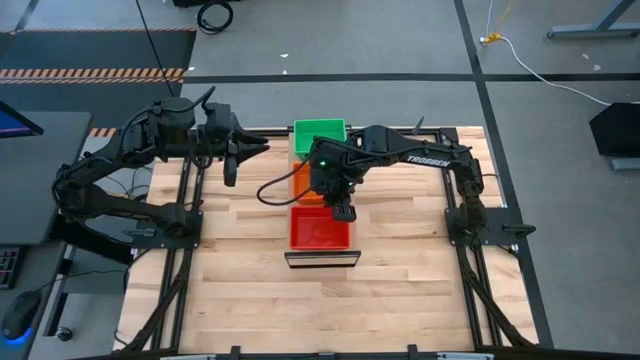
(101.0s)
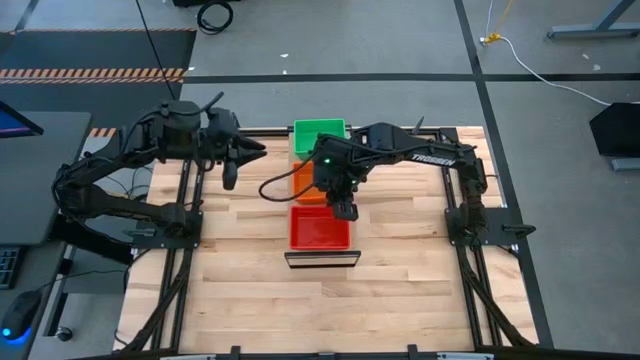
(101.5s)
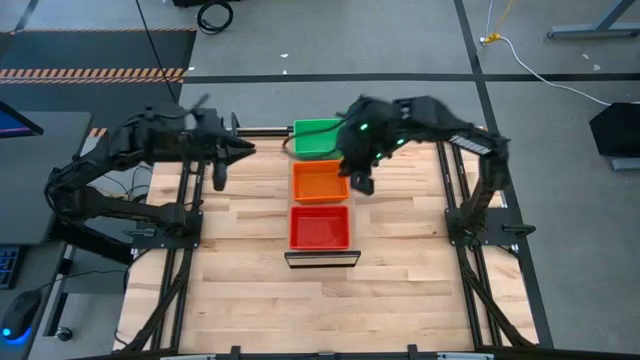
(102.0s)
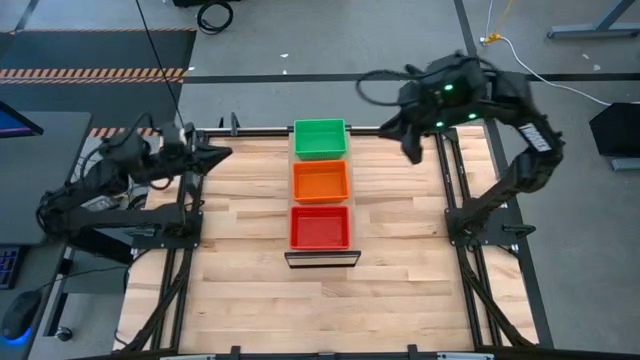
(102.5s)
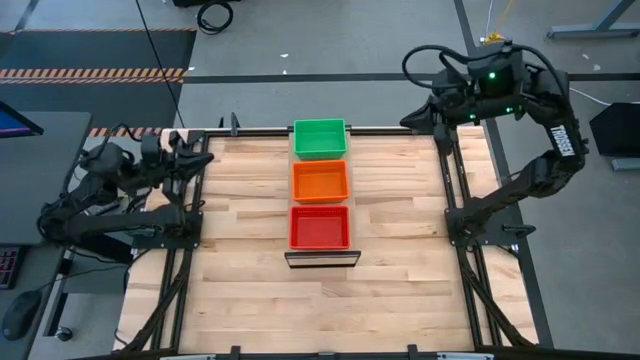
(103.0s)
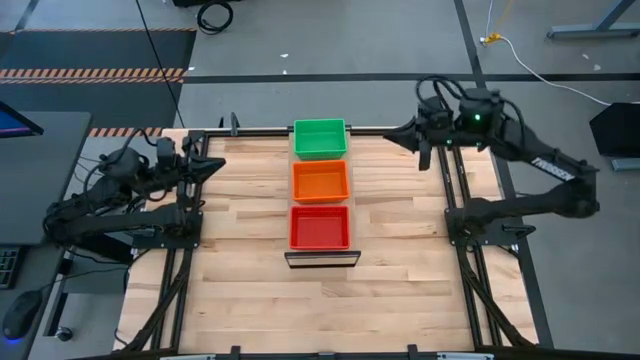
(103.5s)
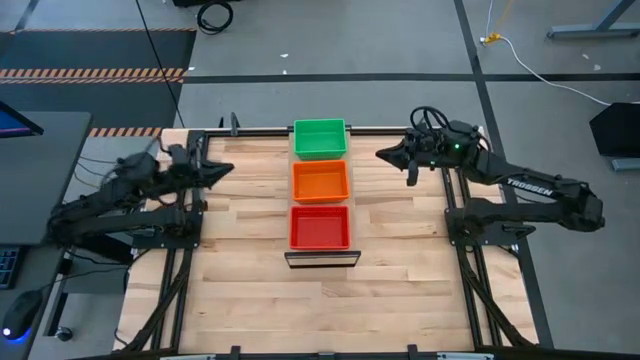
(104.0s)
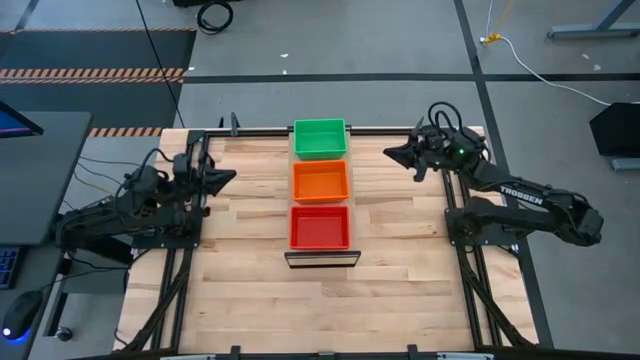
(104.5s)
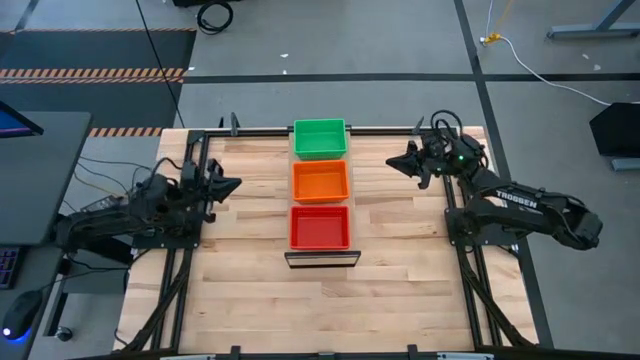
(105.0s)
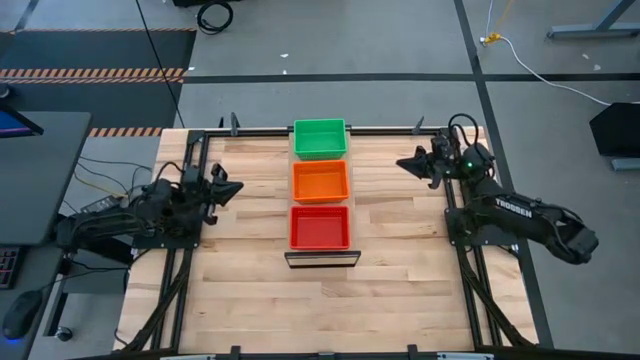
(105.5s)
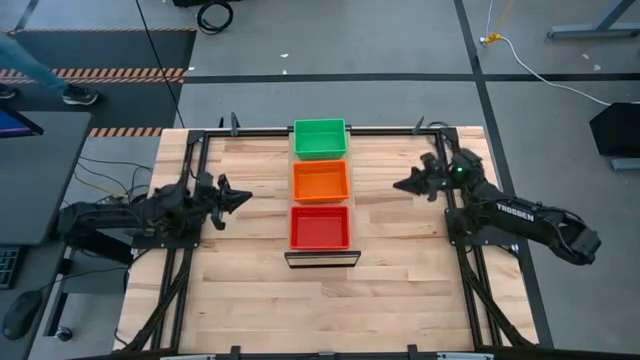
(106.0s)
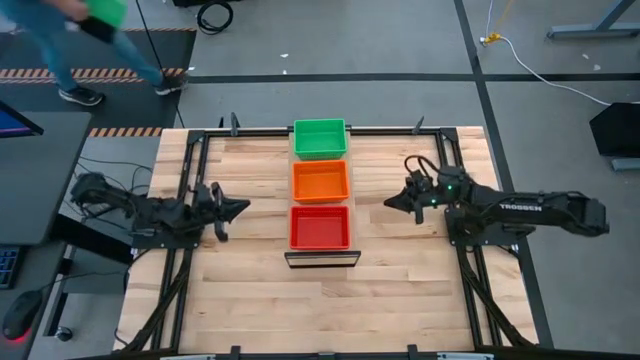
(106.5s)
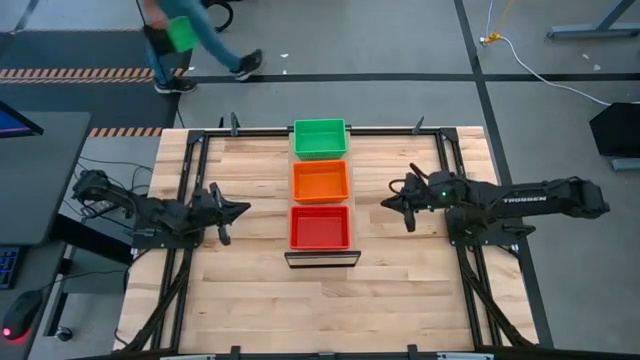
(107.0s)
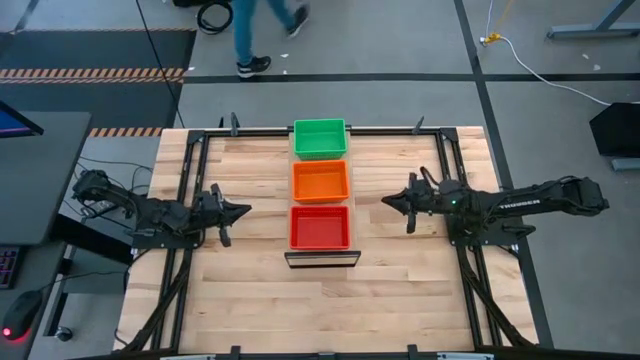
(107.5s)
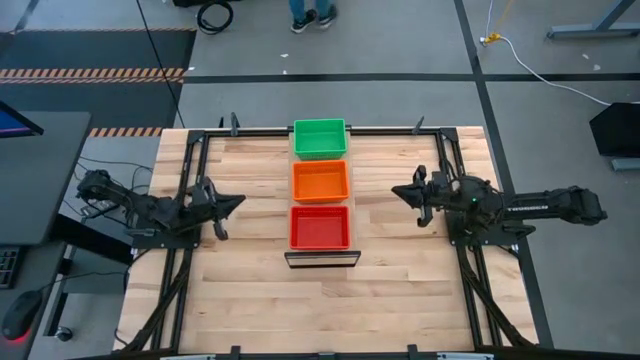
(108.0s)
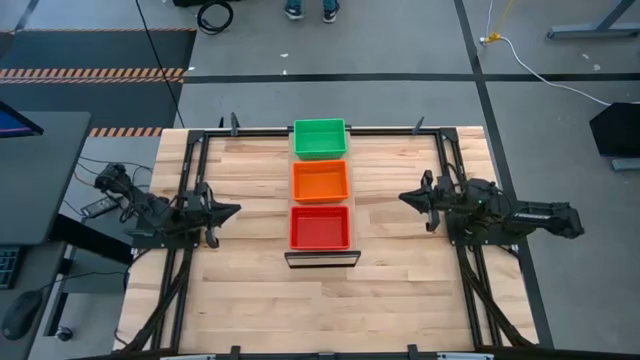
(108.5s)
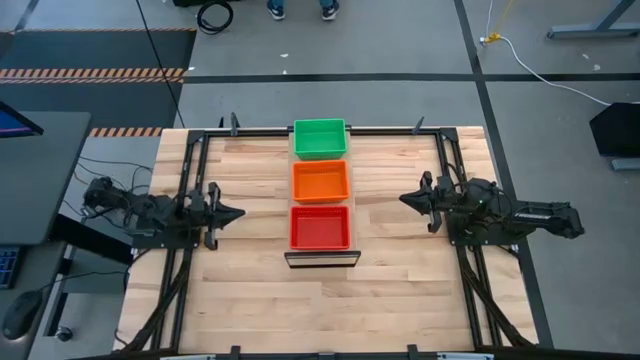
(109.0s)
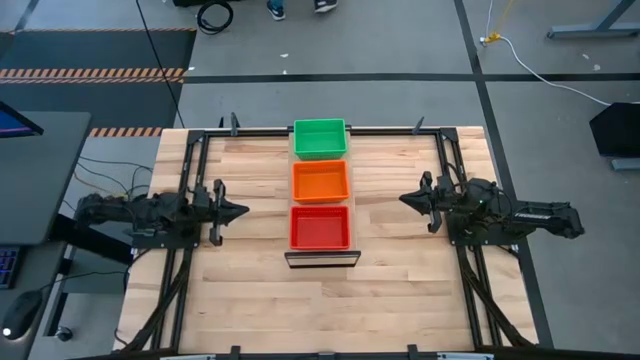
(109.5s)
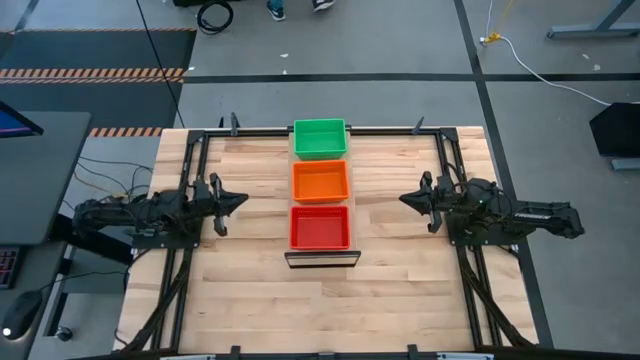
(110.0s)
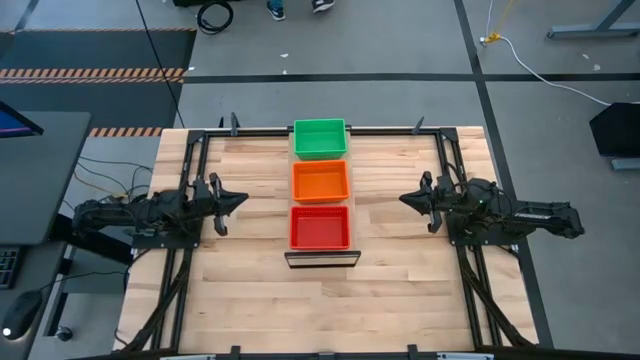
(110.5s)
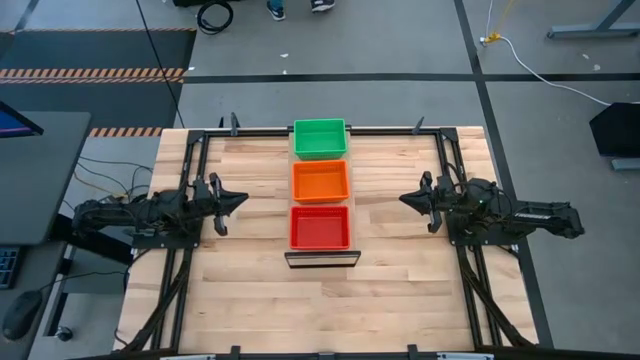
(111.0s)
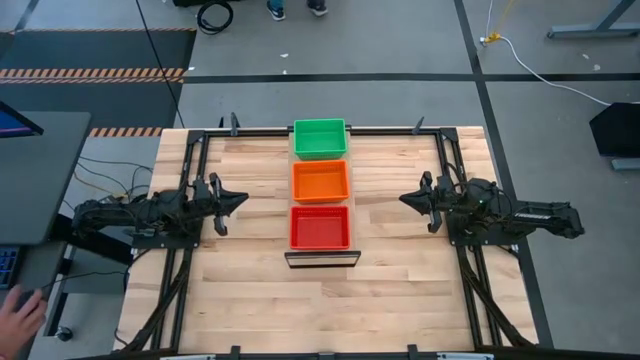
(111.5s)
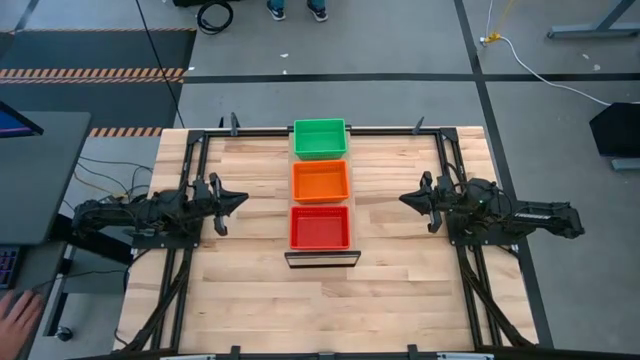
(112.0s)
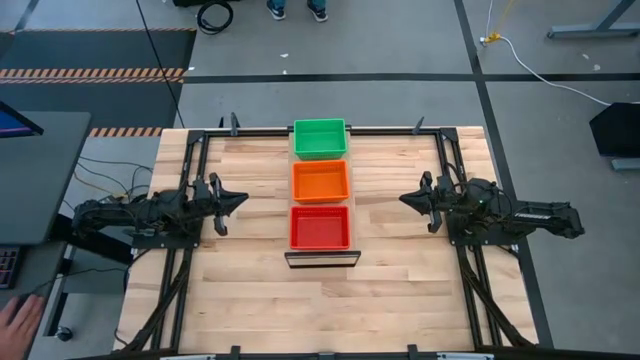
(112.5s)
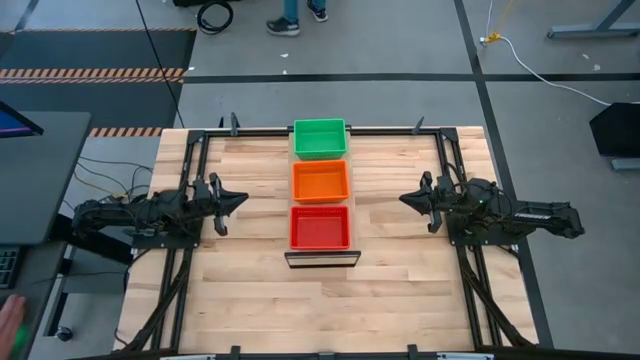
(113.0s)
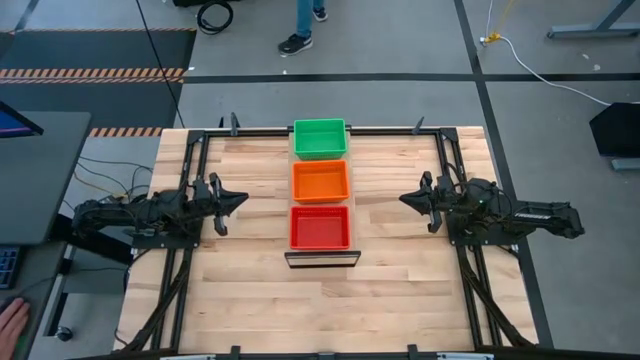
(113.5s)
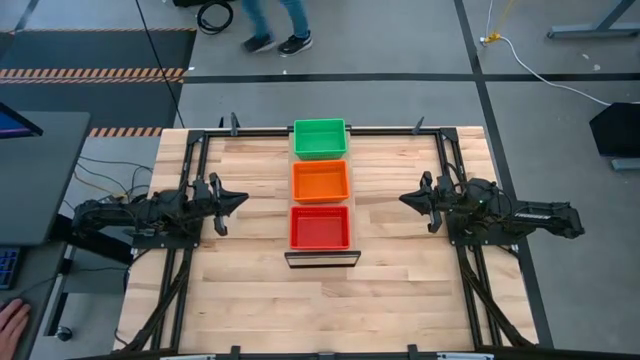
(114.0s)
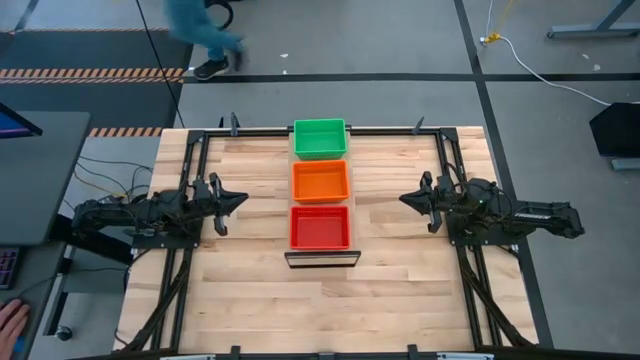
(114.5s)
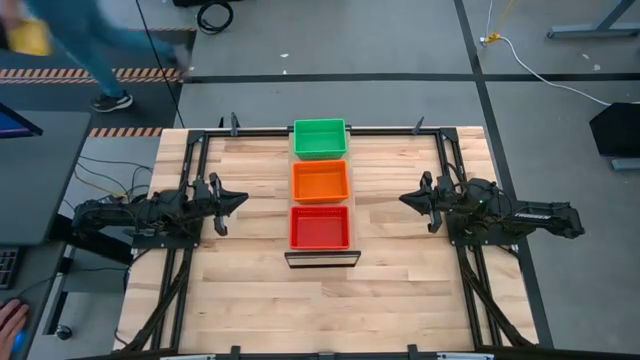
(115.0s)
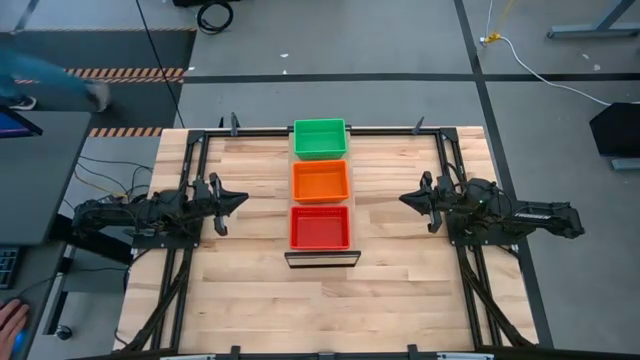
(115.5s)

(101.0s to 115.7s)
Task: Stack baskets on shelf by color
Return to Home Position

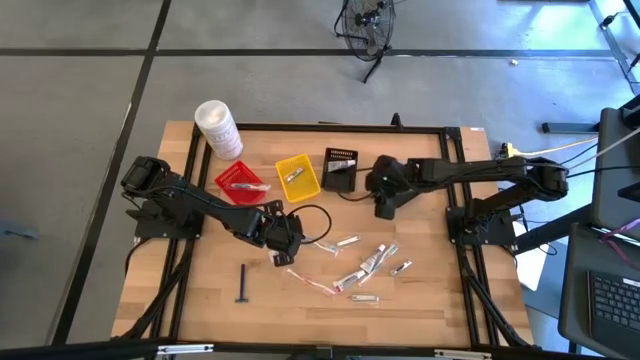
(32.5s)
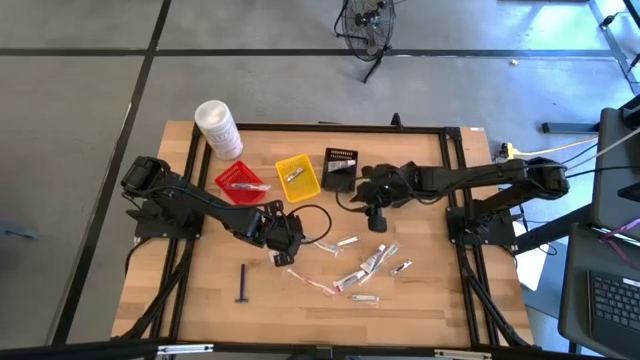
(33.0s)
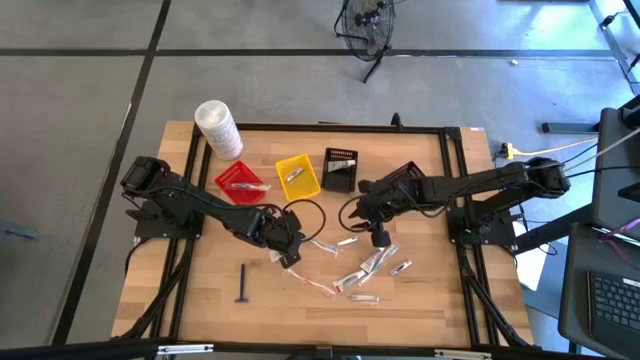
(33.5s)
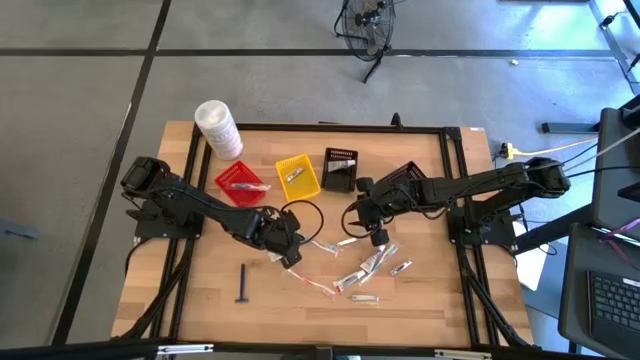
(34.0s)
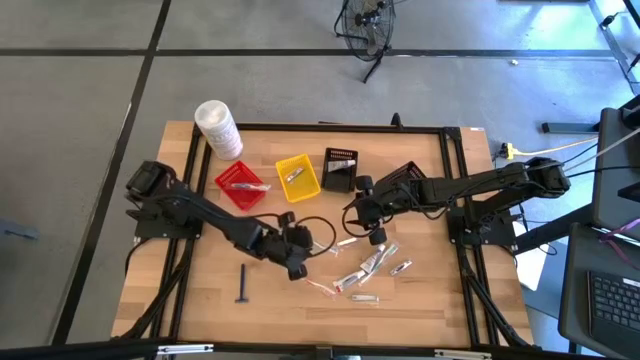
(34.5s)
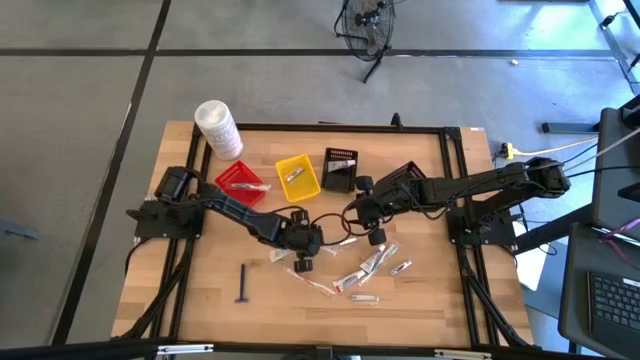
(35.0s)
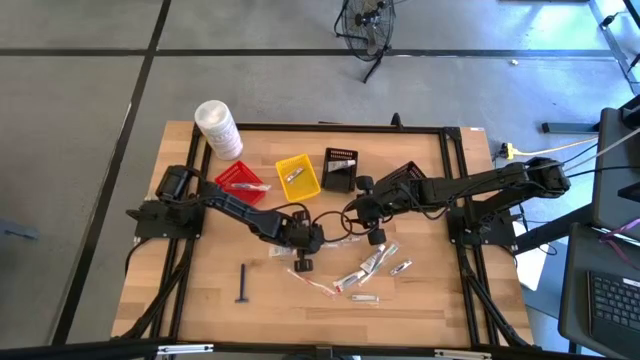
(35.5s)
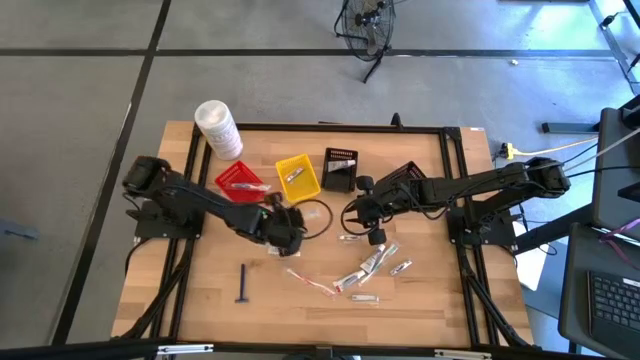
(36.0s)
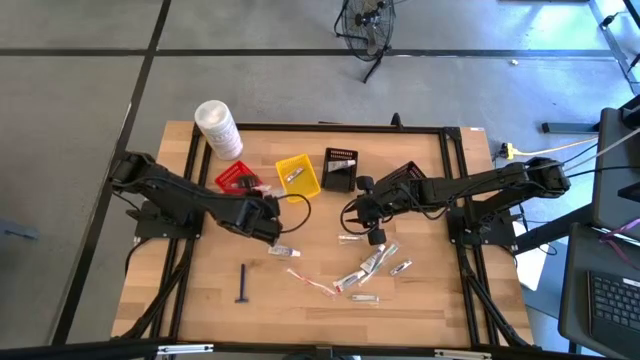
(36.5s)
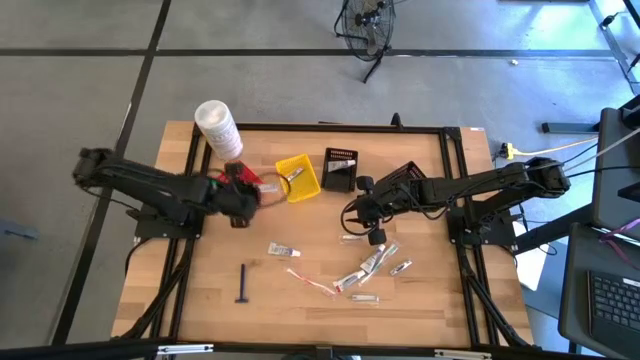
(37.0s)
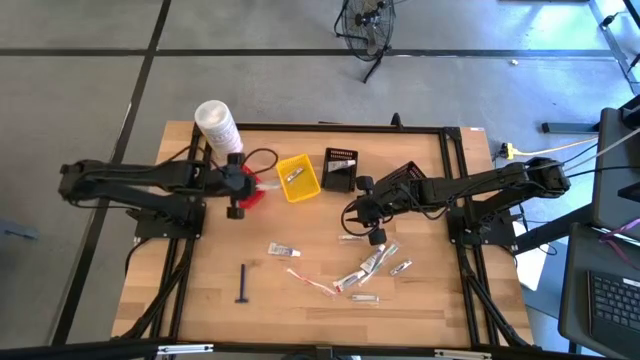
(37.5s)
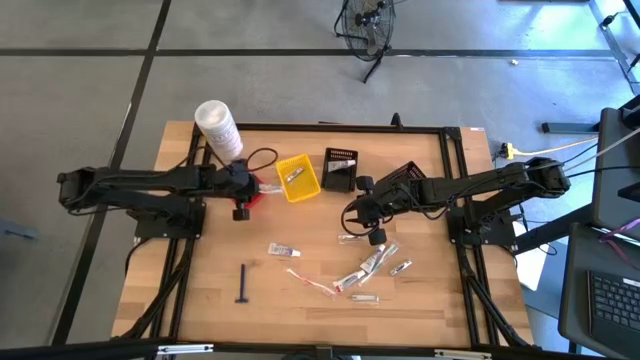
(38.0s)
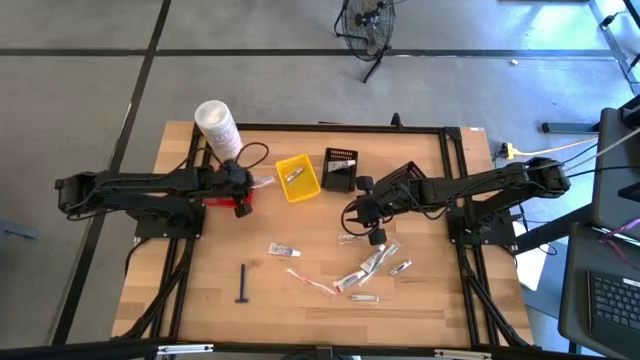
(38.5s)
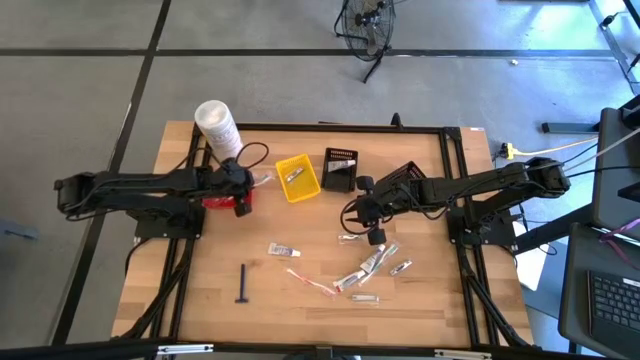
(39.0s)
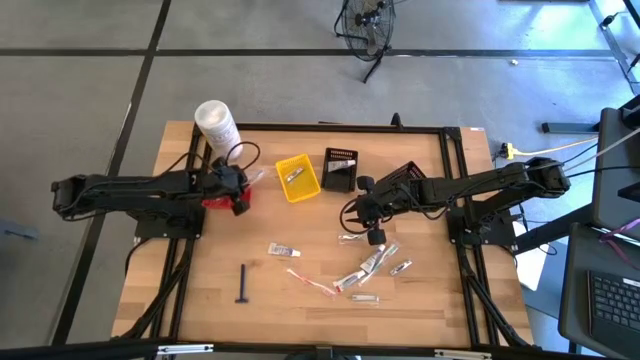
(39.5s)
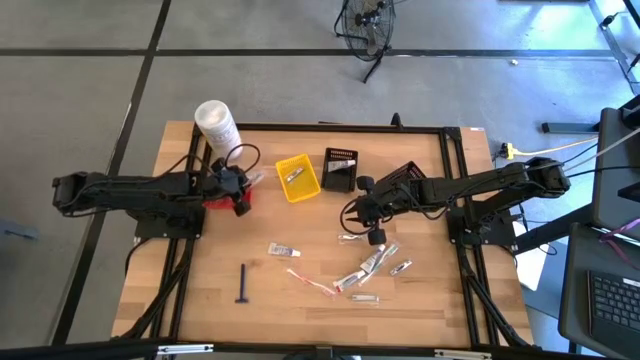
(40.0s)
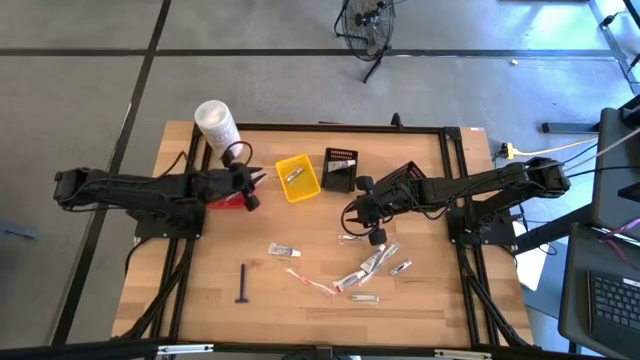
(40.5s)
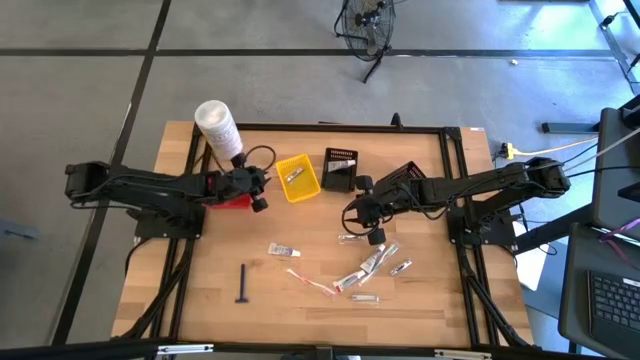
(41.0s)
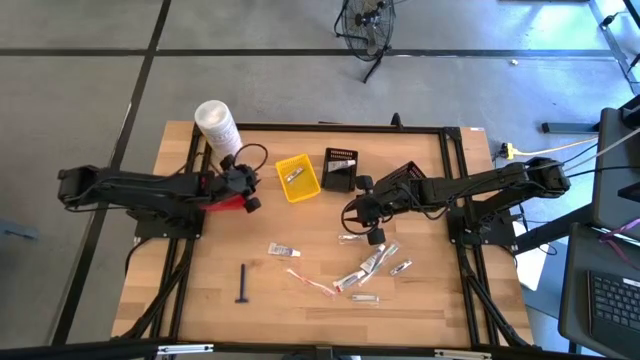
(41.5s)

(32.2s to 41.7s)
Task: Pick & Place Travel size toiletries
Put the blue toothbrush into the red bin
